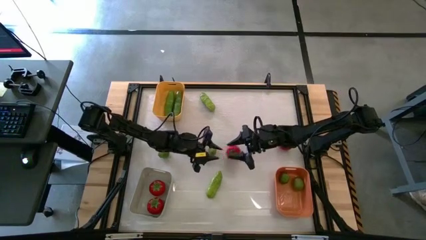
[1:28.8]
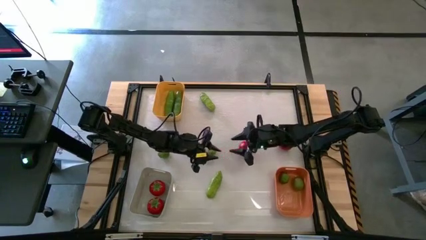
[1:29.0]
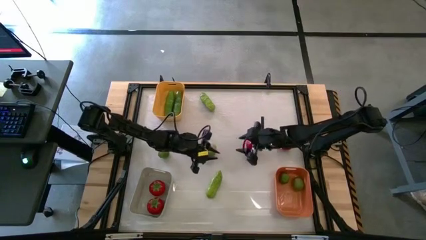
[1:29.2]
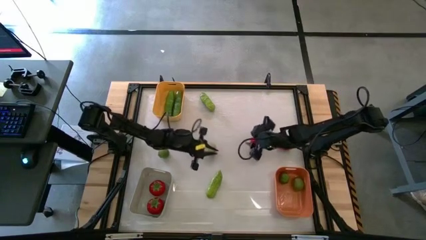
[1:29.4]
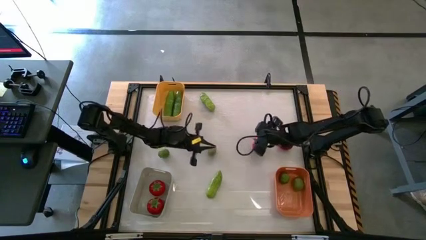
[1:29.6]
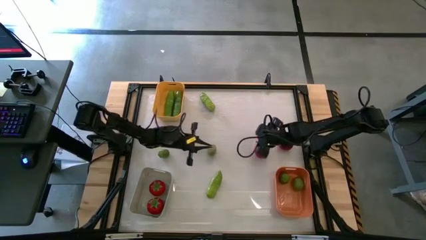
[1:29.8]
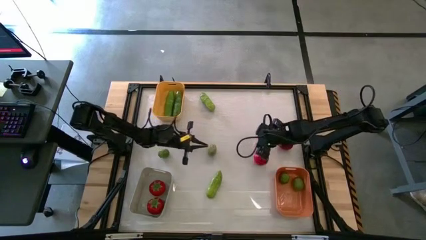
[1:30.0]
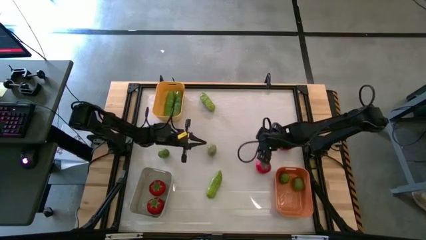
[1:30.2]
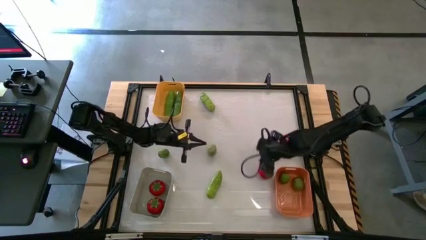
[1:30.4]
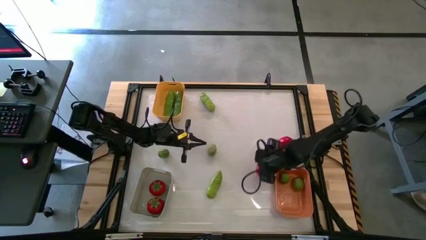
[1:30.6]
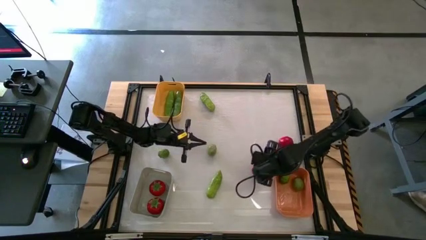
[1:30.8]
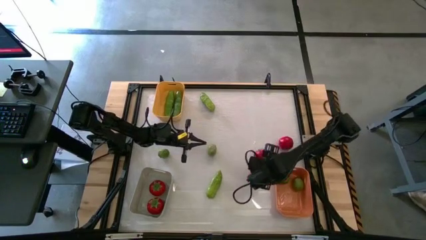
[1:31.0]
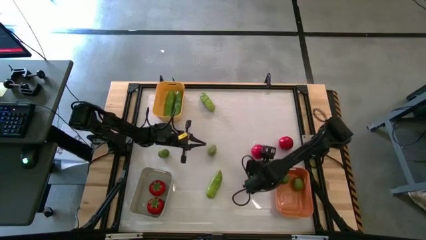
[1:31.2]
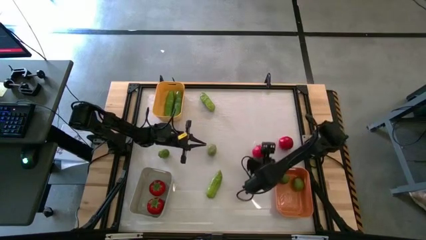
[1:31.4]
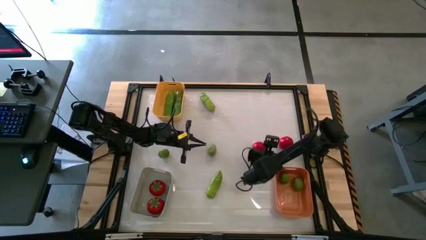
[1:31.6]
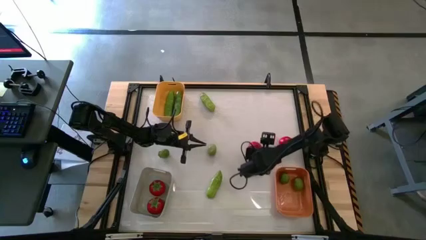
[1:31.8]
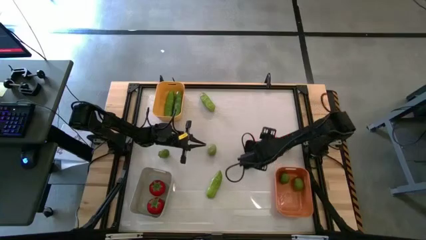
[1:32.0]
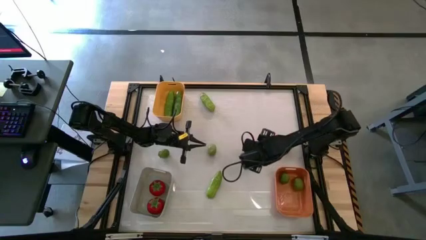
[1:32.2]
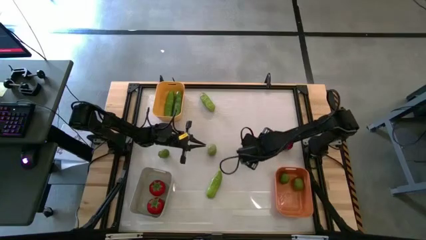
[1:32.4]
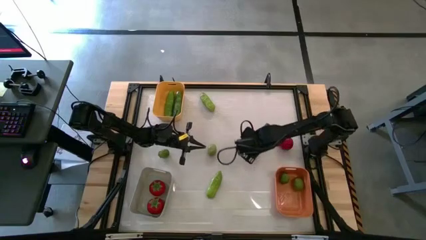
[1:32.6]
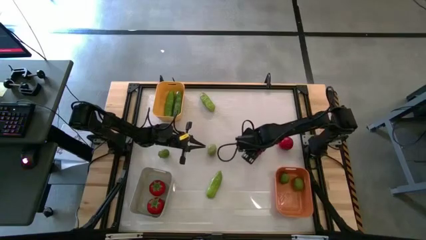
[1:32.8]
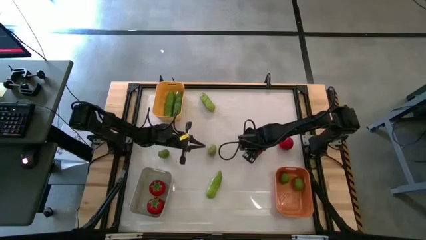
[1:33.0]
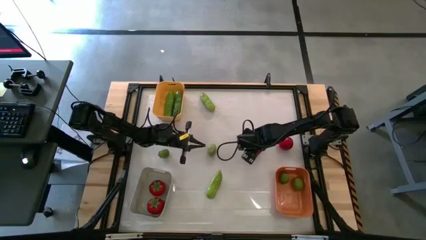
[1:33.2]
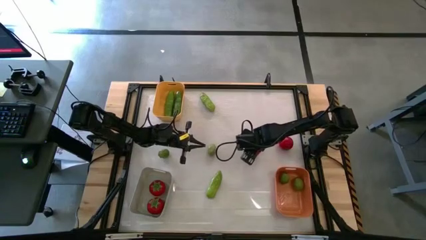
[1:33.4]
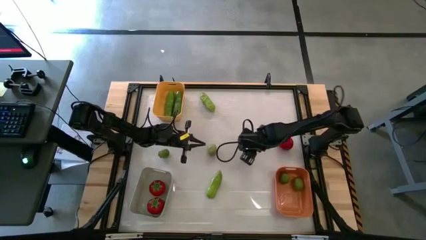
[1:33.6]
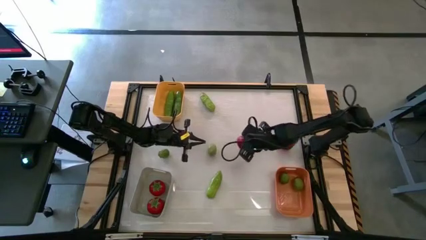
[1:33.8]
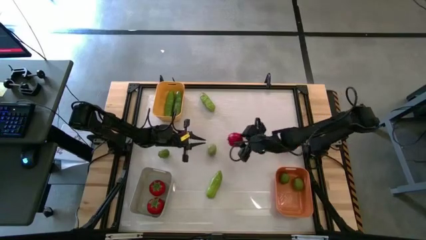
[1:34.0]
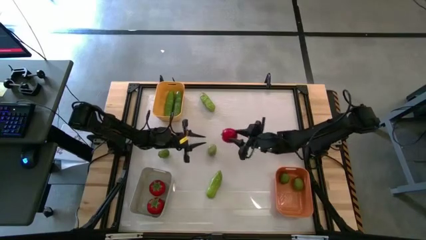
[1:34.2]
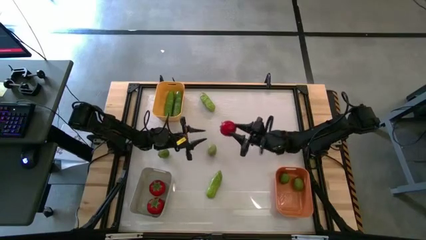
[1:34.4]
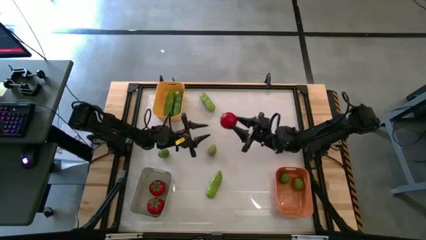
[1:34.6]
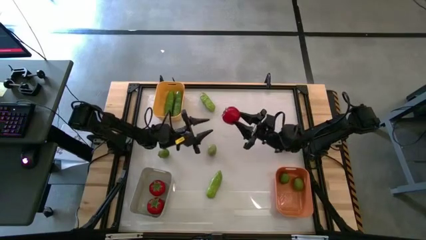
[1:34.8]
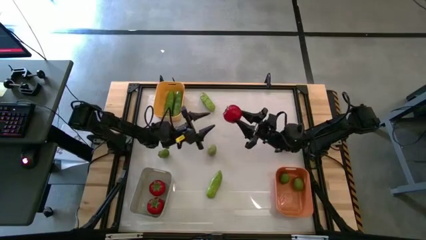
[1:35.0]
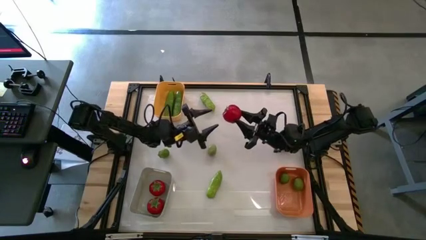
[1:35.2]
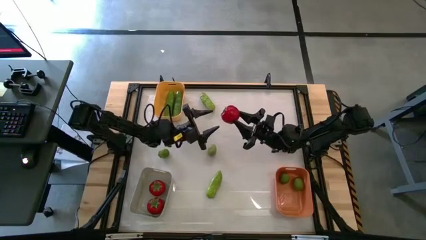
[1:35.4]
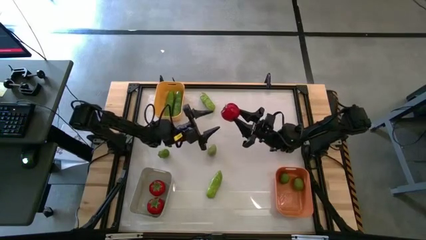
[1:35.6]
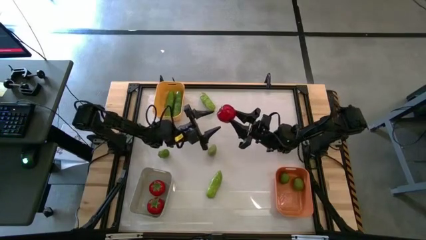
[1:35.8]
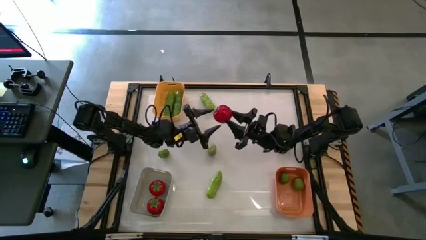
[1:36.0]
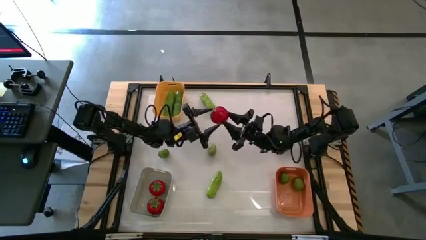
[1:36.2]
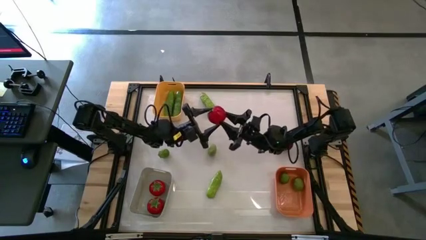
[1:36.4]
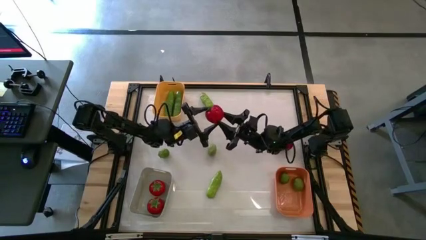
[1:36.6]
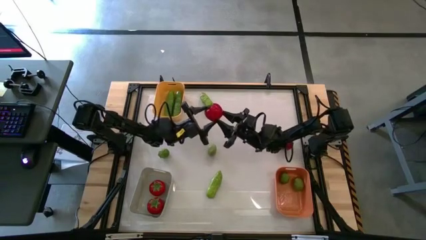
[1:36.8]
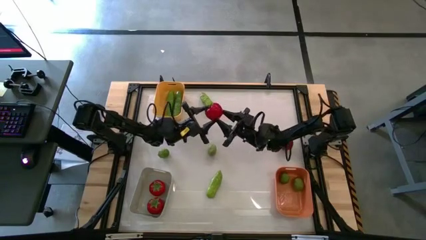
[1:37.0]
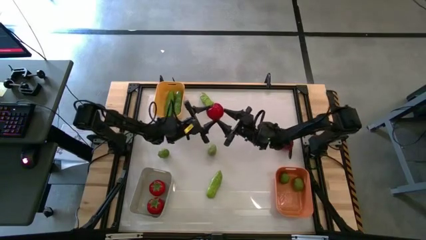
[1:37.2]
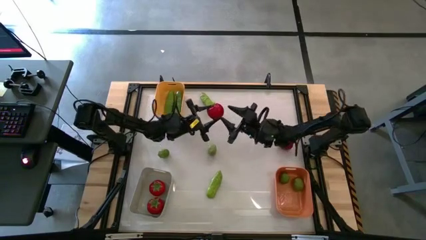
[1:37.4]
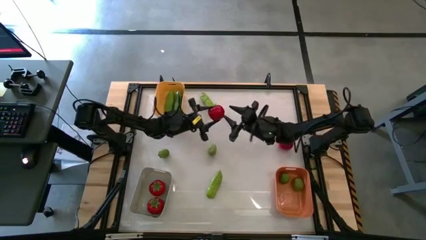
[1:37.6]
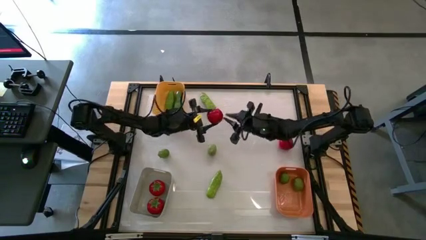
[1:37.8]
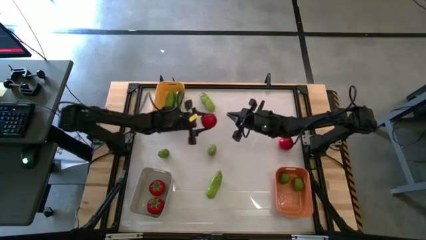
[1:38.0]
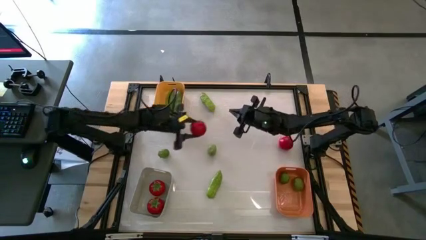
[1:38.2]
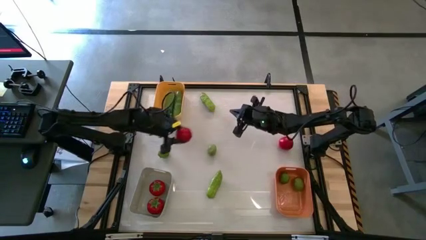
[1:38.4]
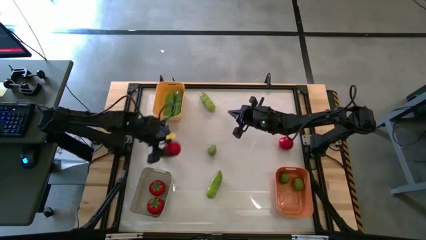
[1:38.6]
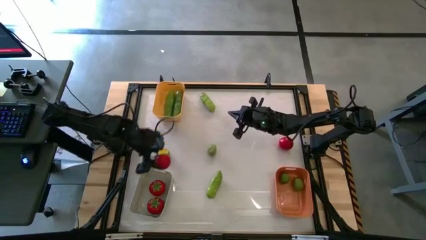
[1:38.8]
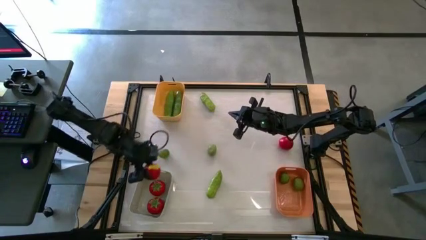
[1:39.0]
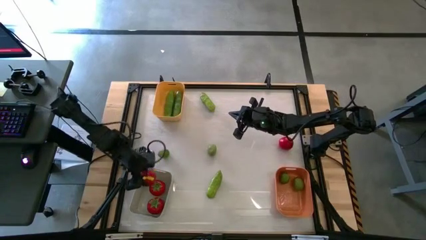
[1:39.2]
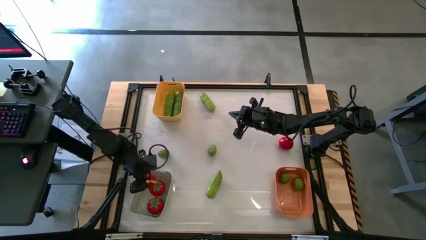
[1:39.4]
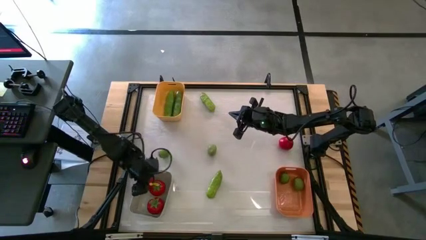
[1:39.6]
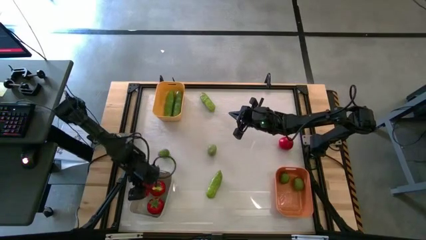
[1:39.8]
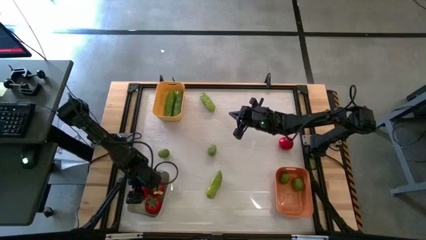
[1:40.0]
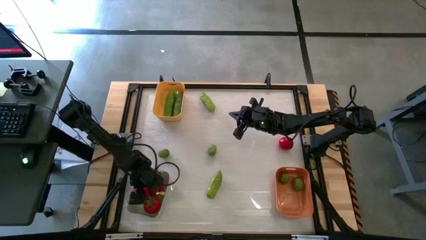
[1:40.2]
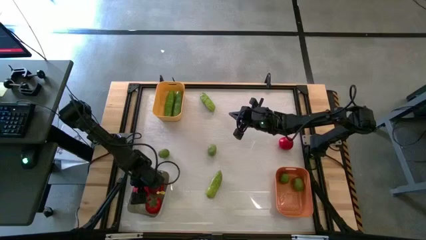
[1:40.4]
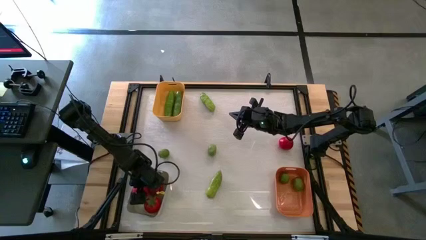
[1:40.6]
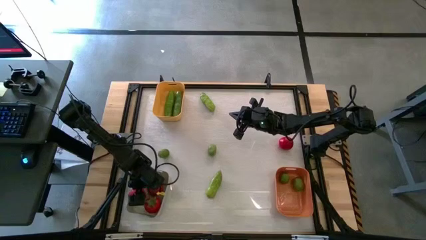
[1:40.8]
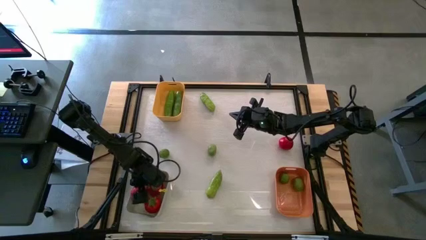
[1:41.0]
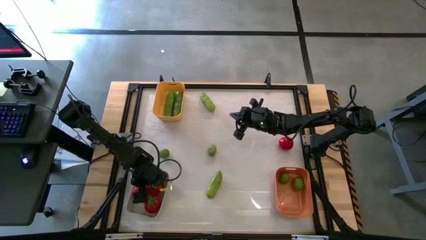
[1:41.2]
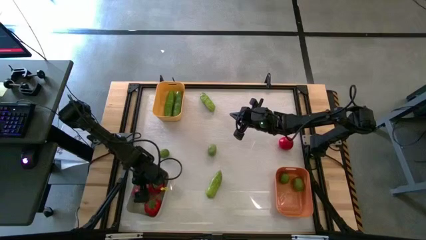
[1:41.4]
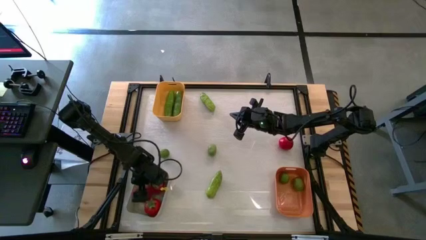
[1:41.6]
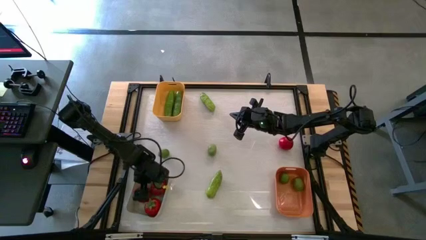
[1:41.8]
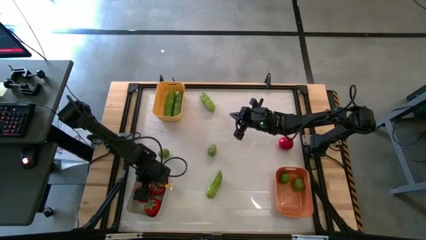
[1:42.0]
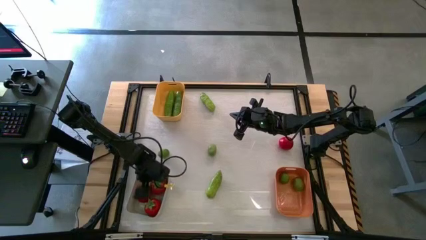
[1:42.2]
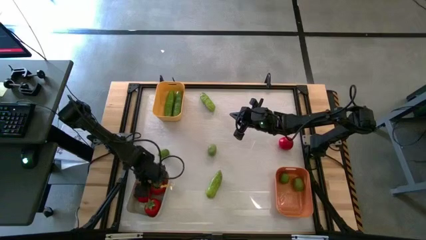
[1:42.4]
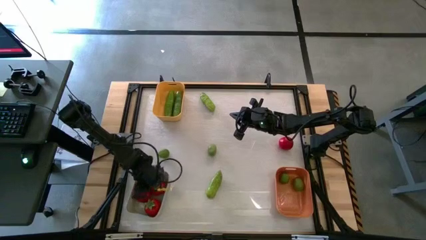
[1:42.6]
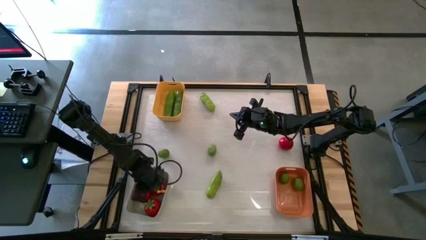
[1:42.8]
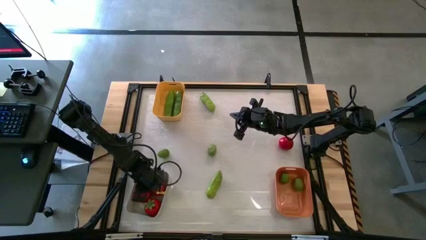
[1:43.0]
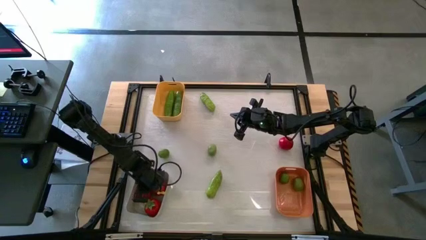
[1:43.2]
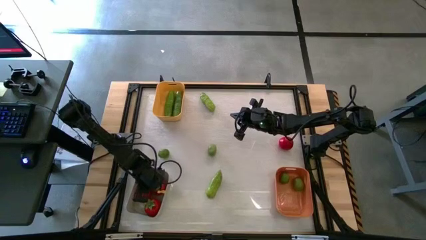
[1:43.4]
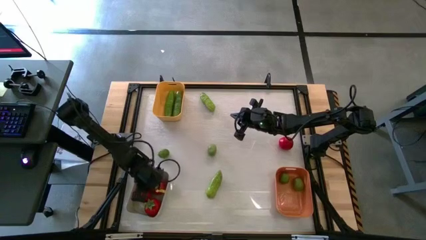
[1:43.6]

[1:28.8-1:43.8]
Task: Sort produce into baskets
Put the red tomato into the gray bin
